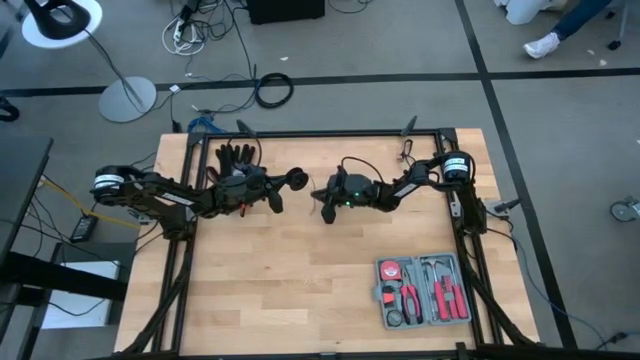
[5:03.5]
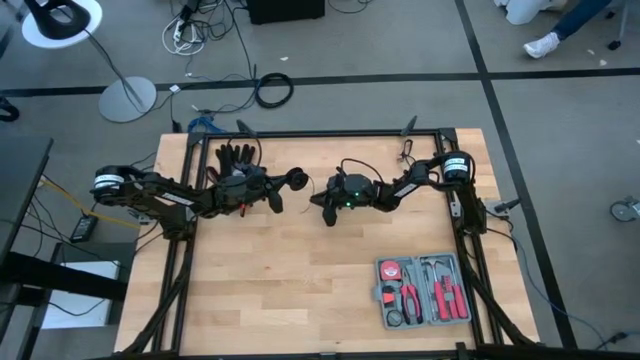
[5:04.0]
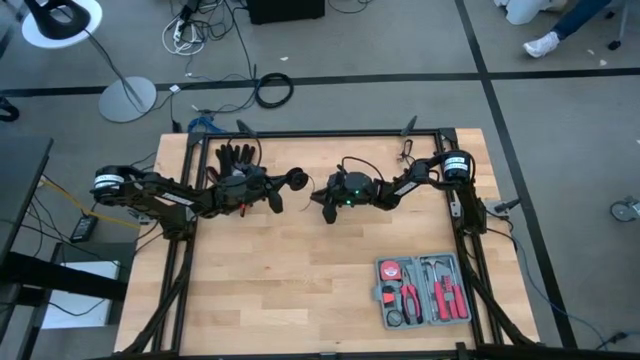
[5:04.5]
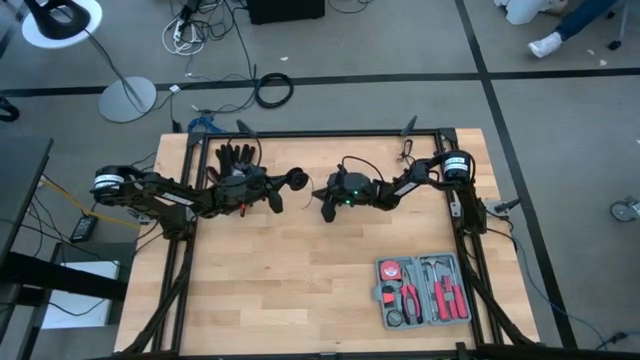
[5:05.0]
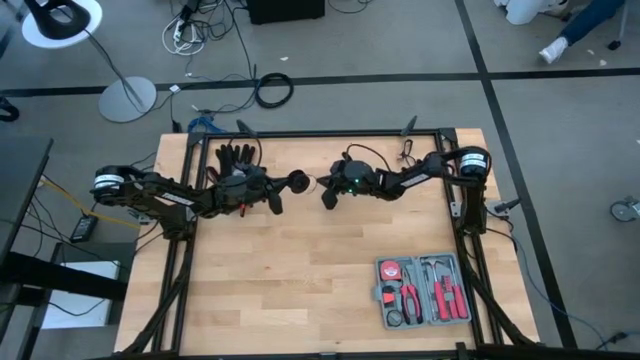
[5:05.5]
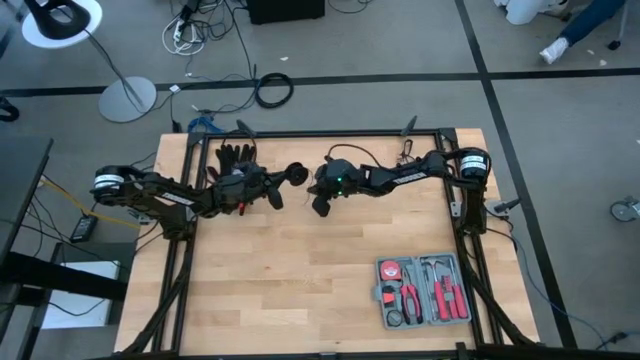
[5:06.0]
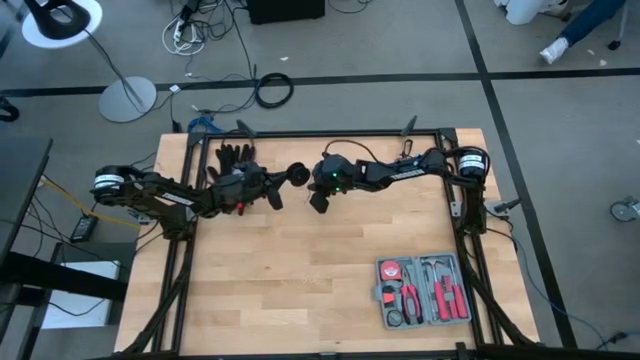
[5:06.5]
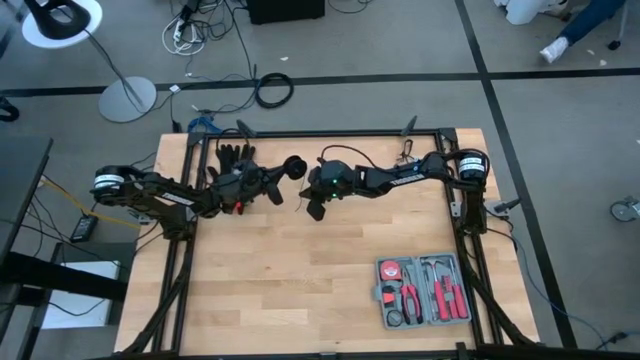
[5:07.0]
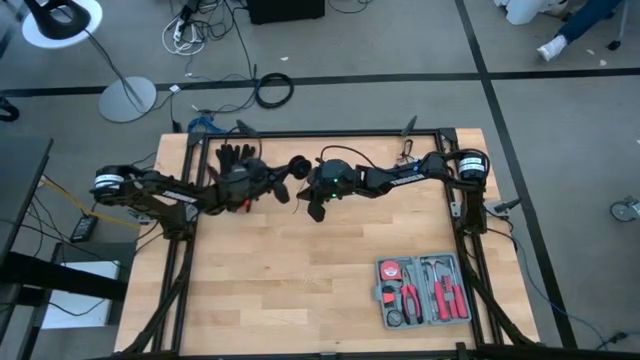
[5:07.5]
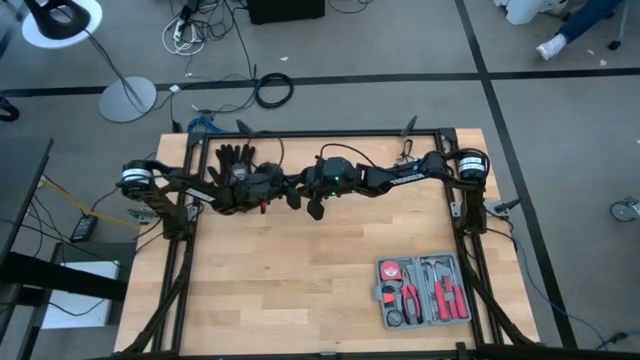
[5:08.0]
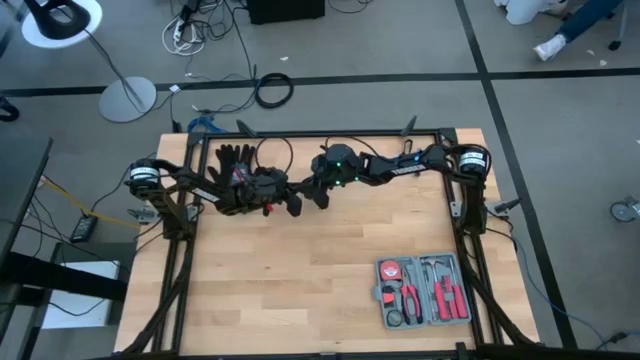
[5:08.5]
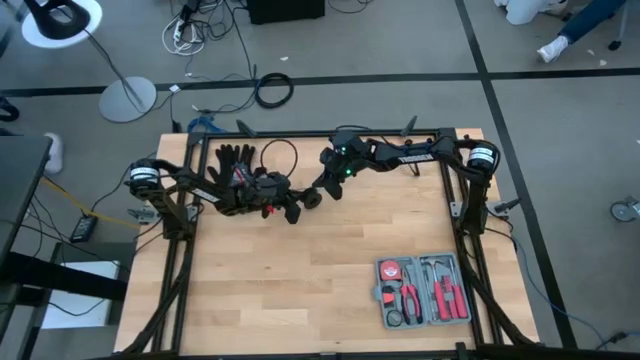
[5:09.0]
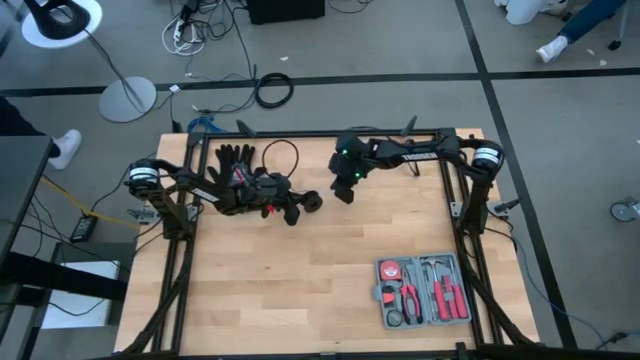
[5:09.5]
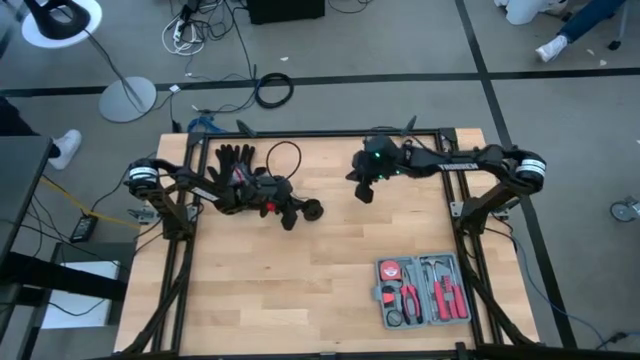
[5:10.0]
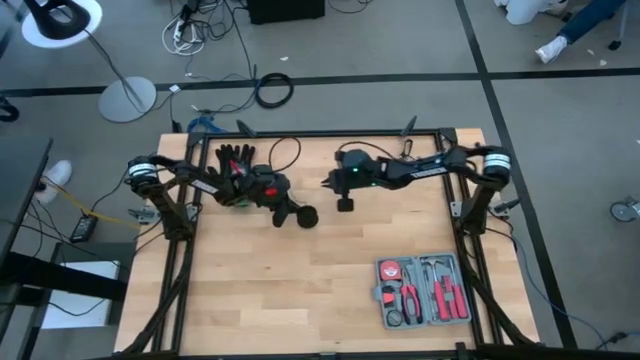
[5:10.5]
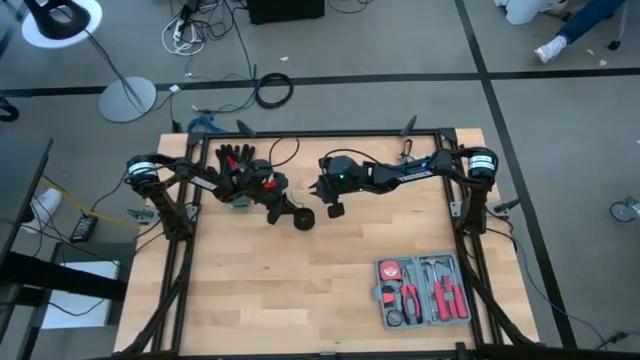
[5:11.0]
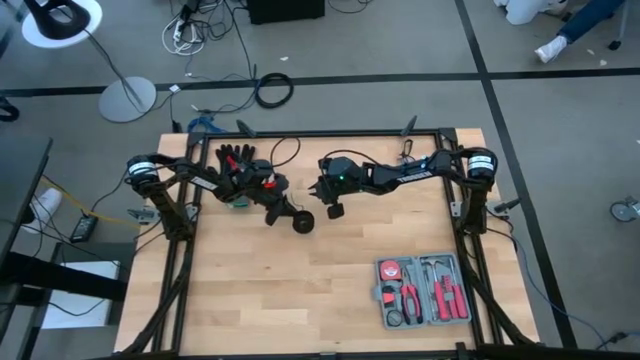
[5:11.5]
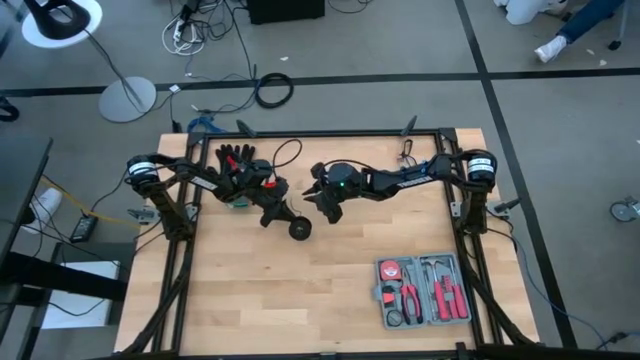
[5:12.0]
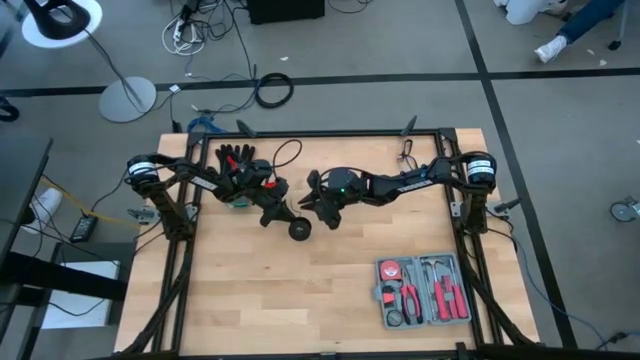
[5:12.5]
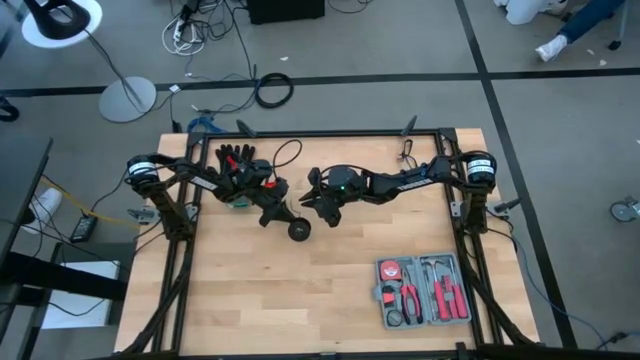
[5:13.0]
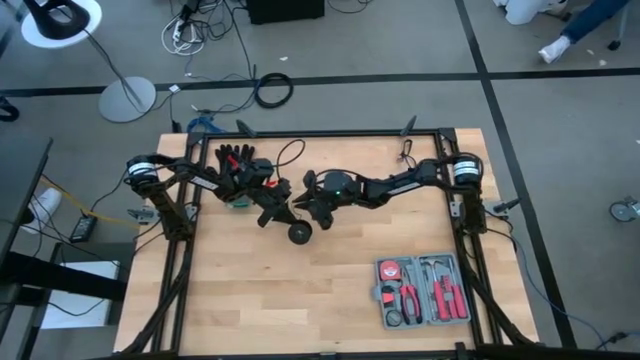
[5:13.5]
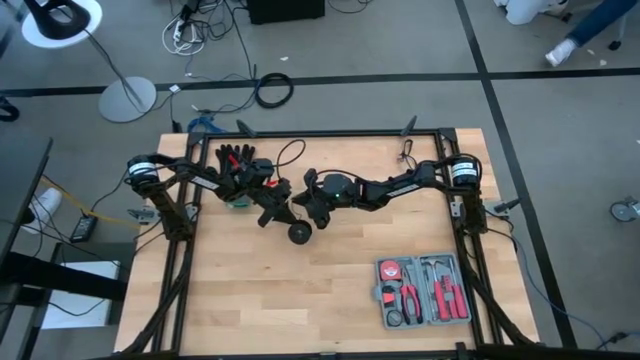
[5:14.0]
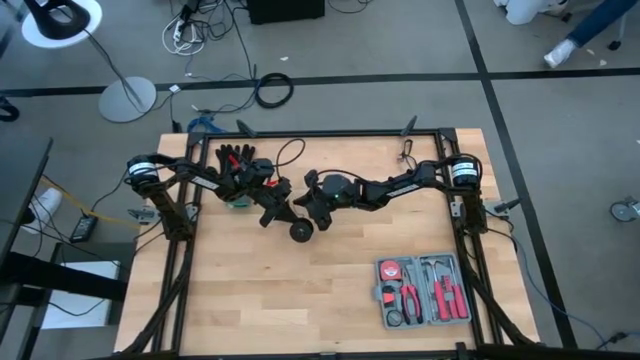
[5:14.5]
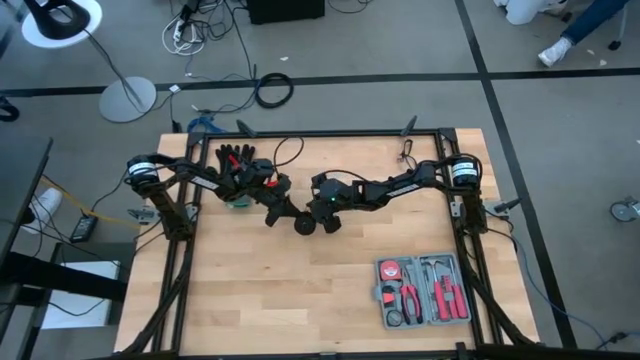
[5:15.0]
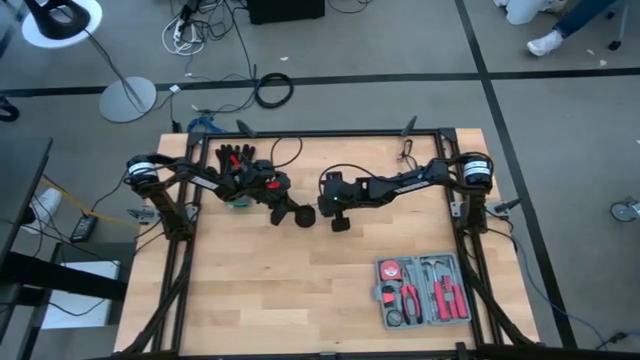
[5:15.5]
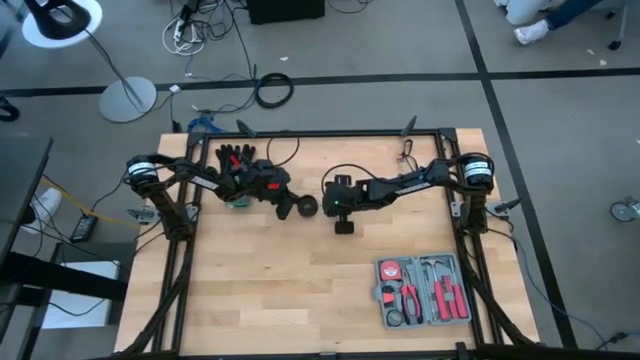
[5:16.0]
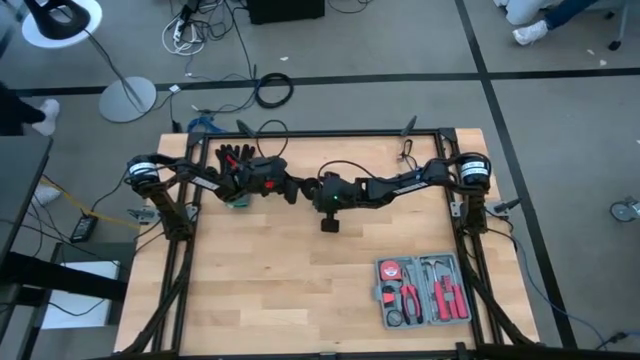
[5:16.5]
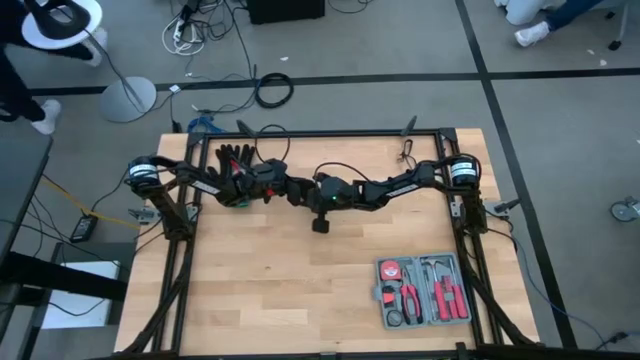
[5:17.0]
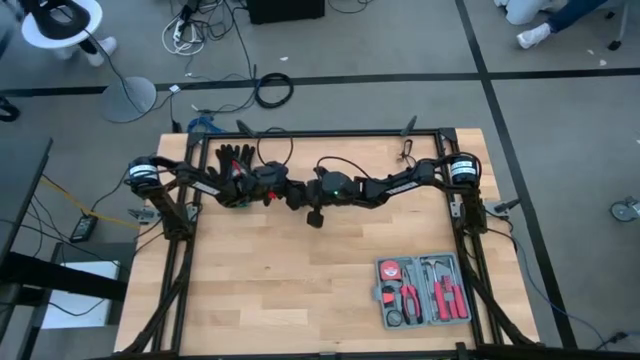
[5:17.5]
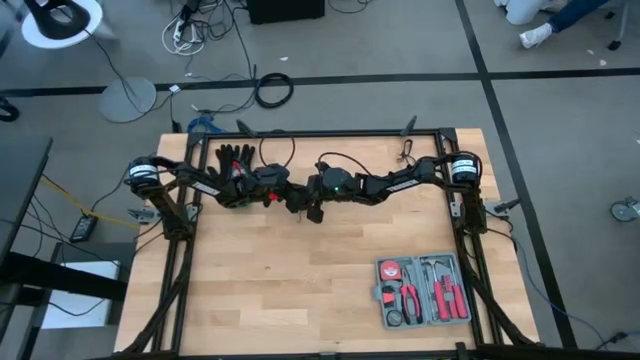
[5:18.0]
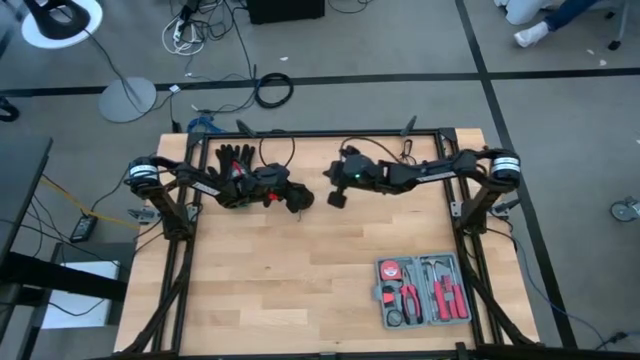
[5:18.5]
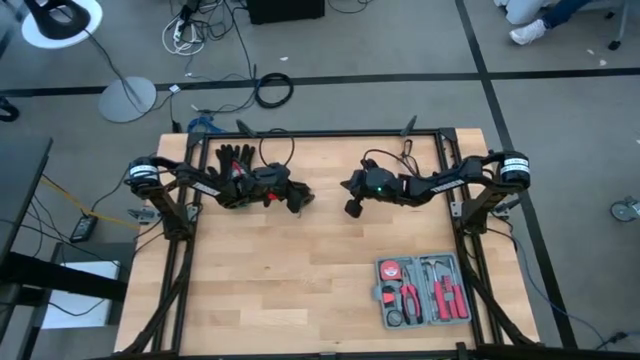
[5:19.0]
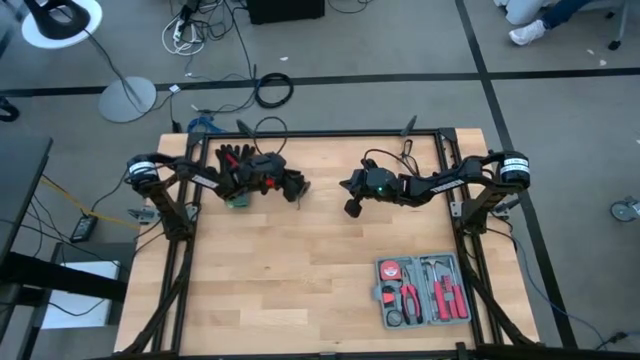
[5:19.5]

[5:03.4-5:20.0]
Task: Coil cords
Coil the black wire

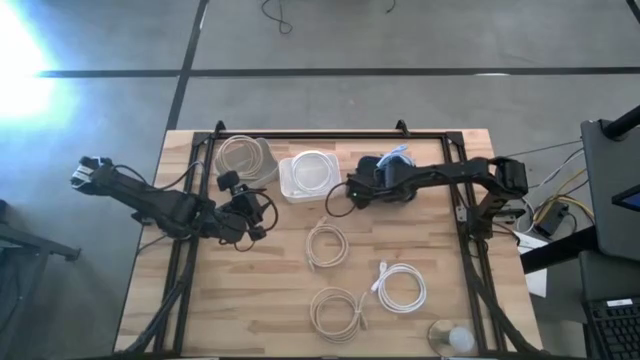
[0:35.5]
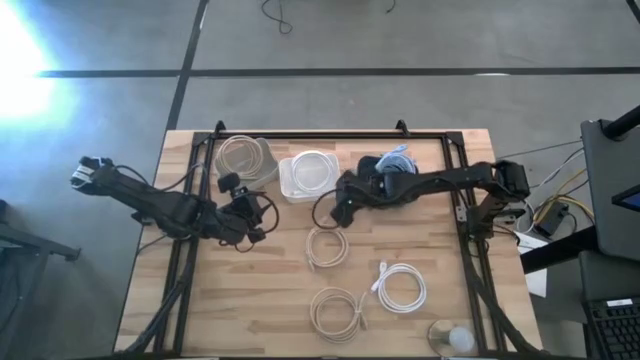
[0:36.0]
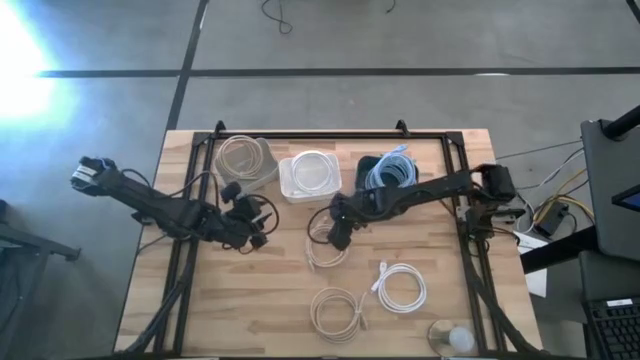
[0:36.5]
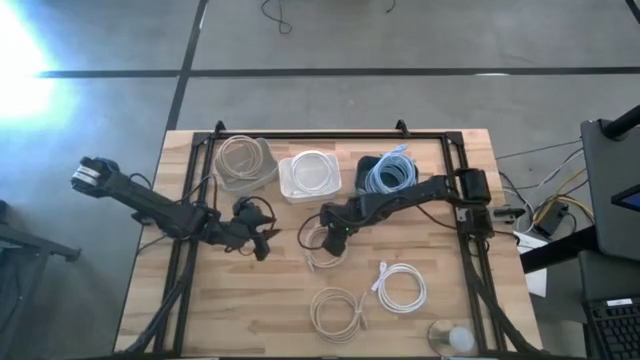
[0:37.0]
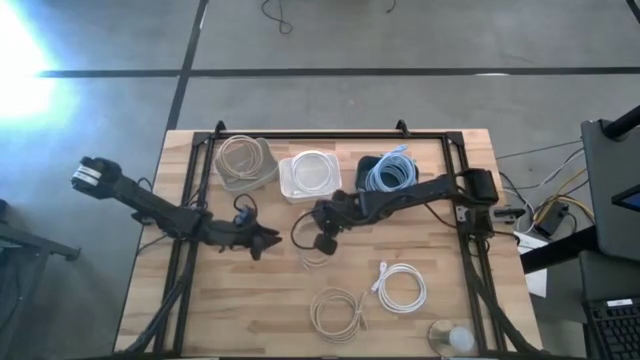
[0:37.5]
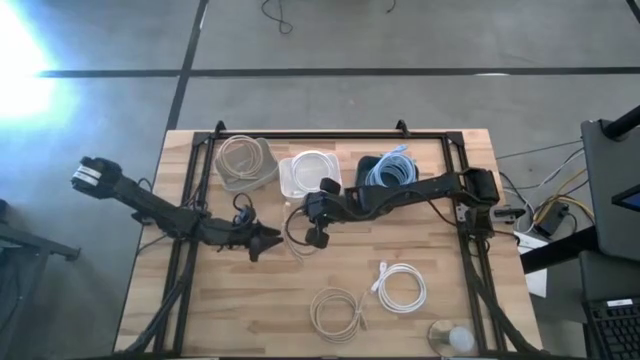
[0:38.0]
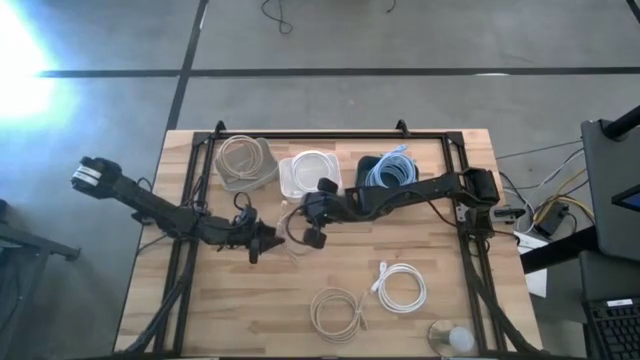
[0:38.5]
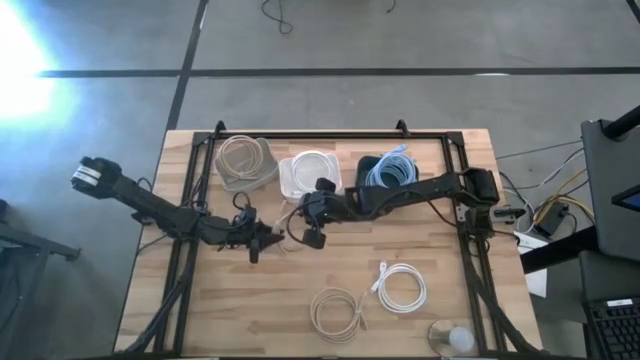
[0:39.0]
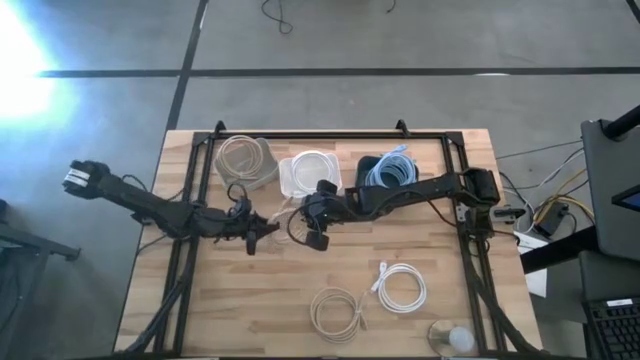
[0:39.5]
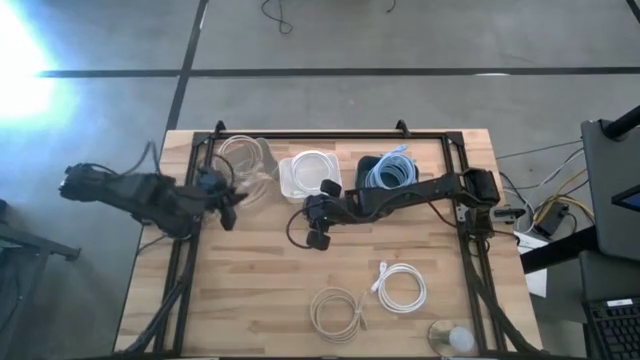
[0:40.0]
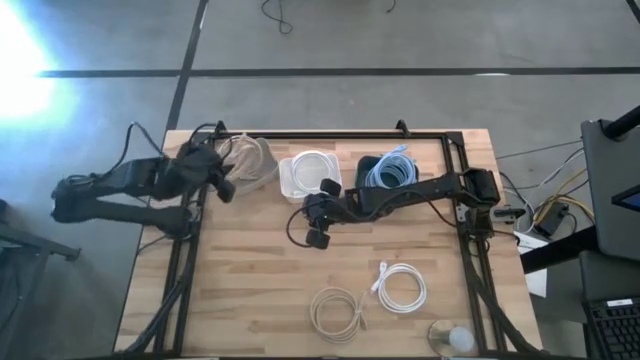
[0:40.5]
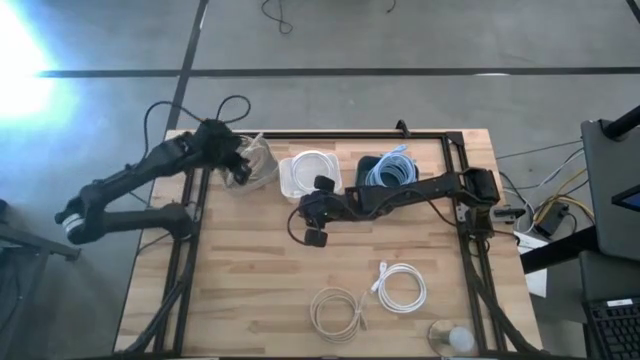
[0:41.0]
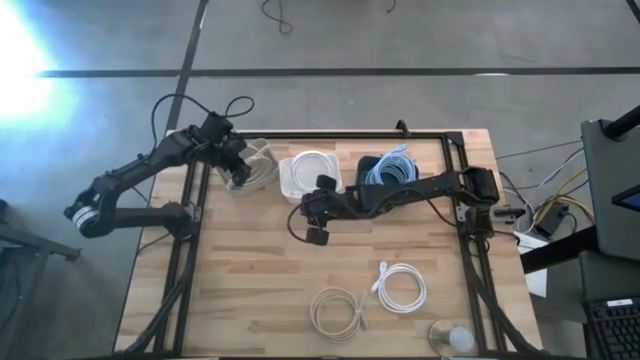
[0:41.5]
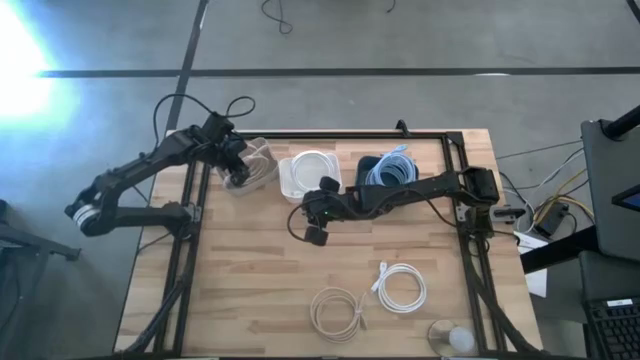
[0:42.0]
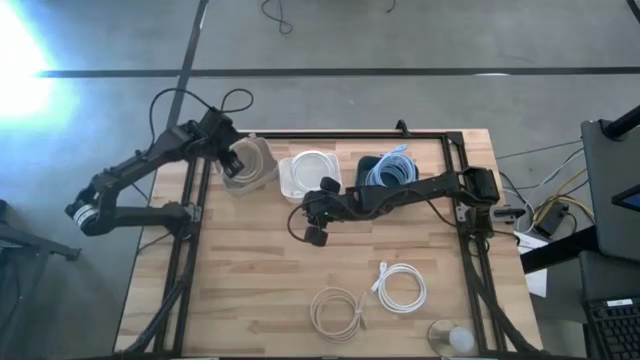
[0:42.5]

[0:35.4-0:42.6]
Task: Sort HDMI cables
Put the top light brown HDMI cable into the gray bin
